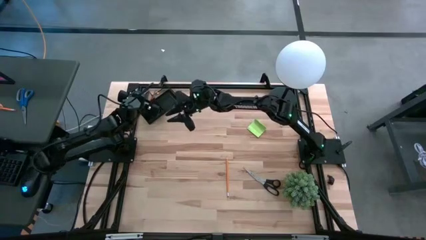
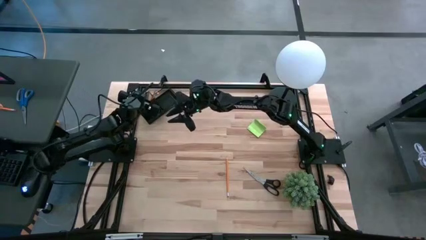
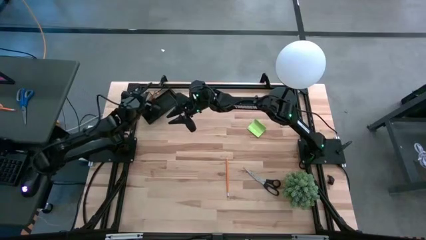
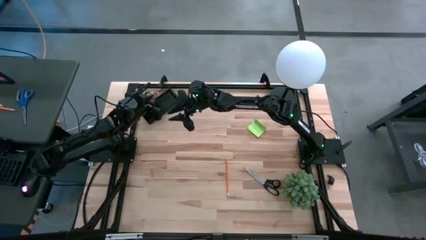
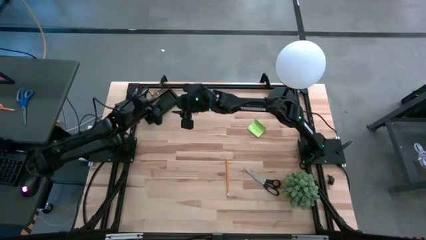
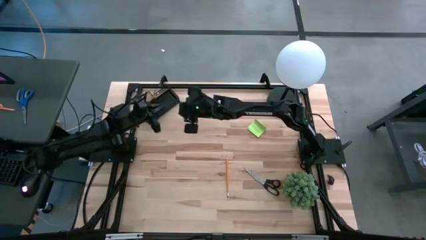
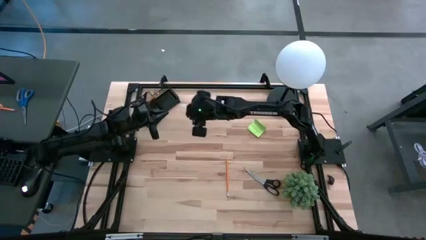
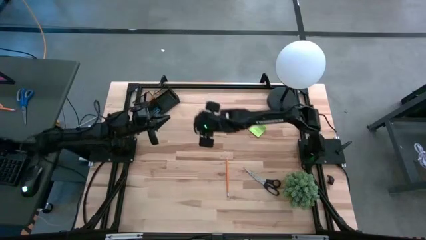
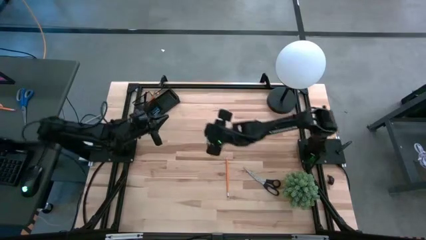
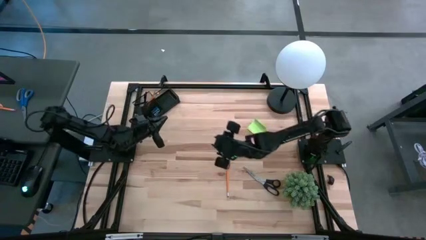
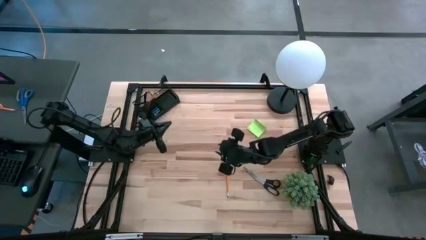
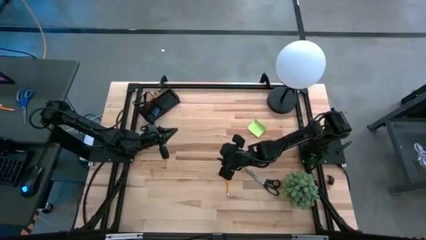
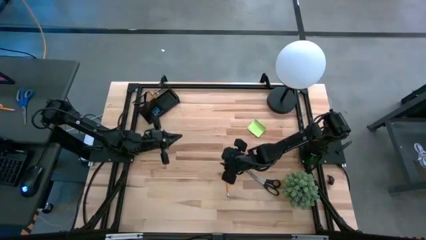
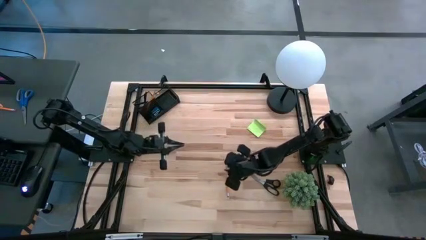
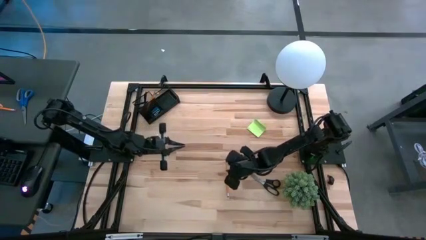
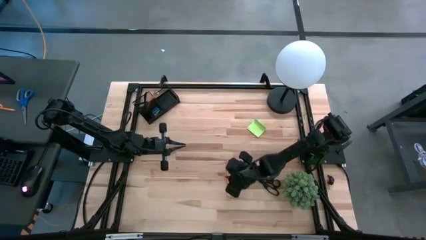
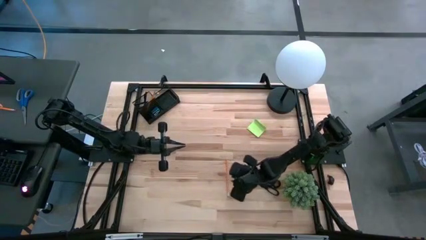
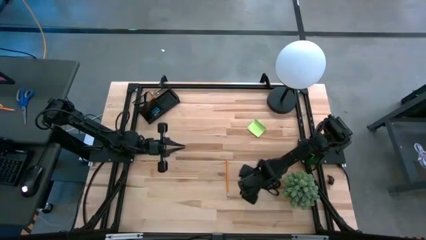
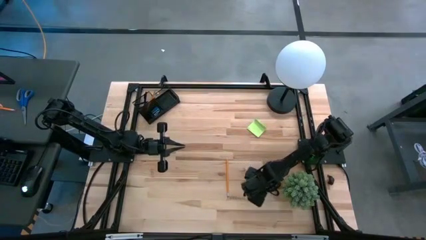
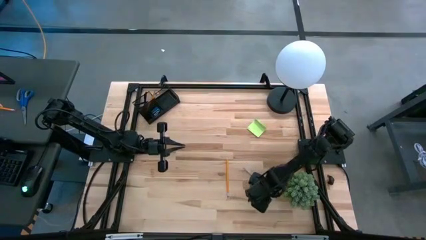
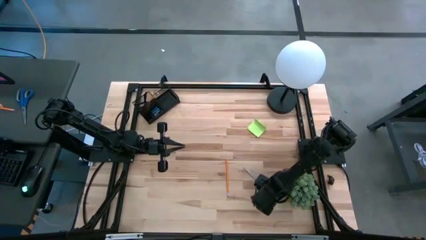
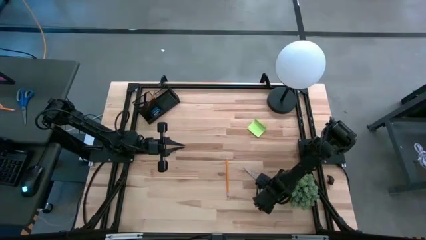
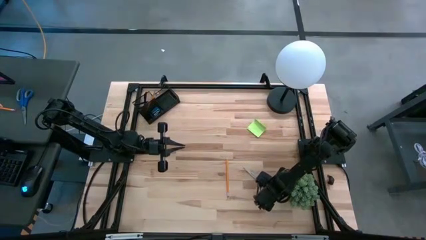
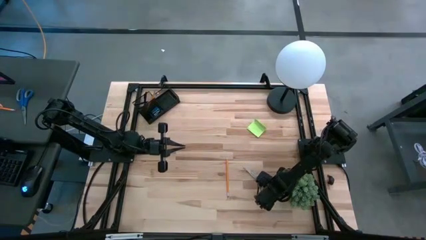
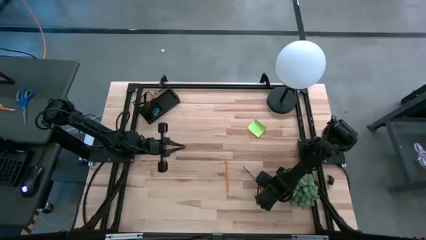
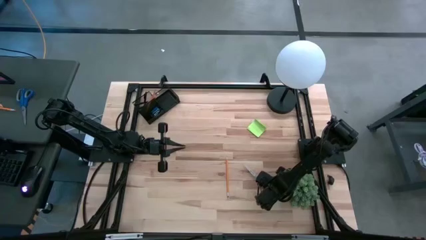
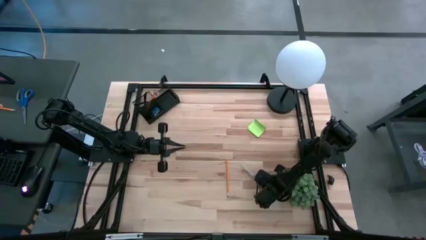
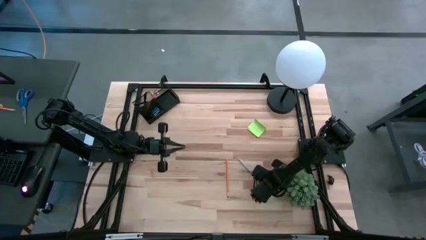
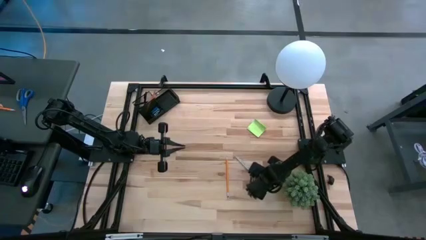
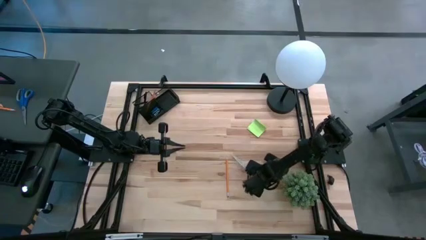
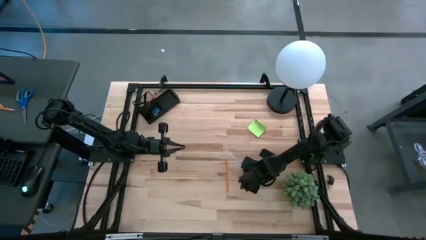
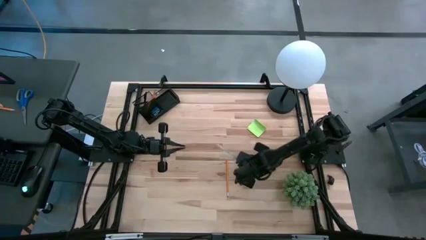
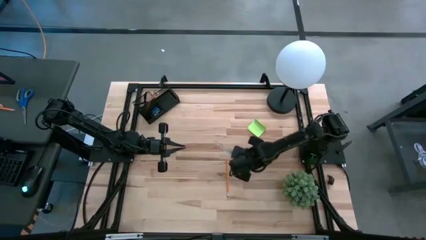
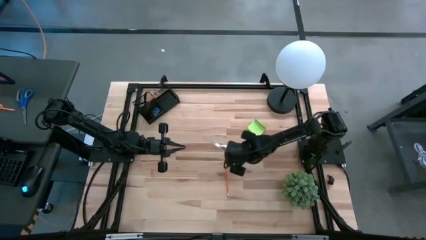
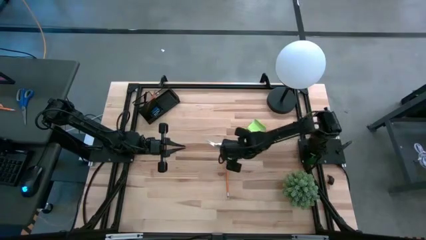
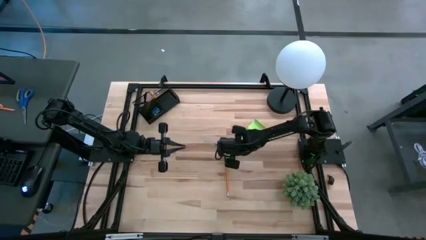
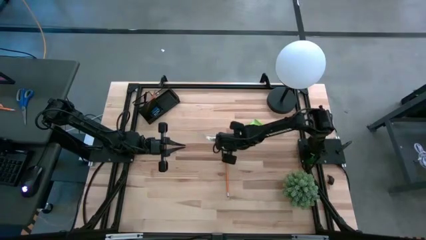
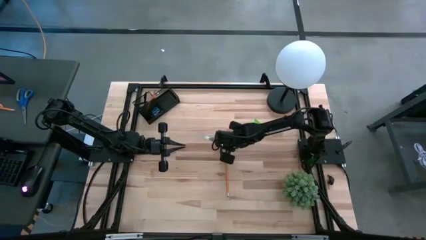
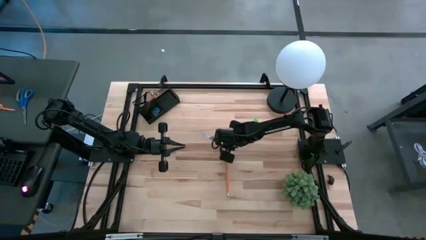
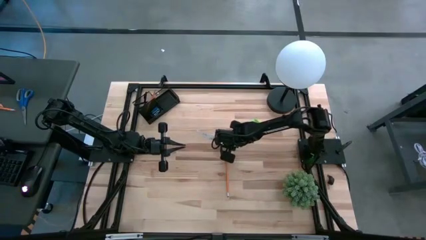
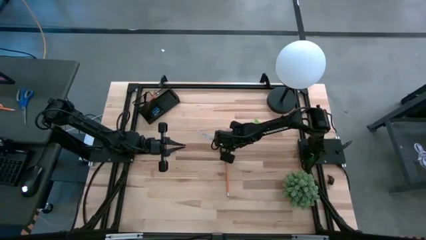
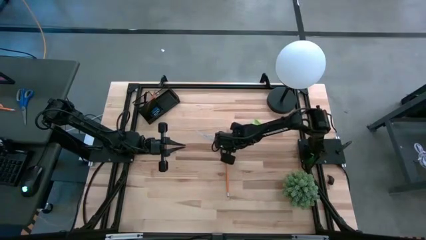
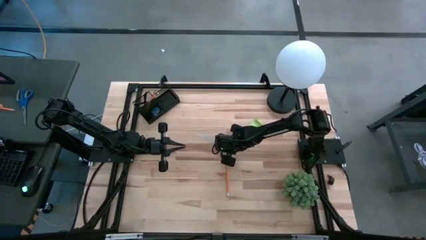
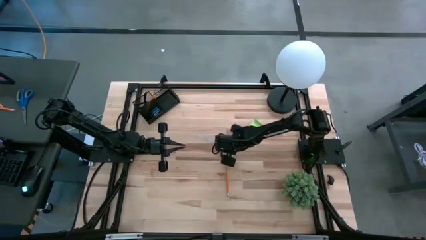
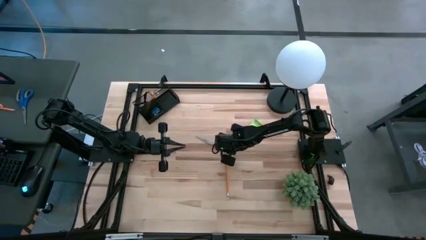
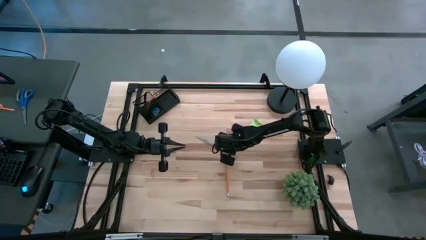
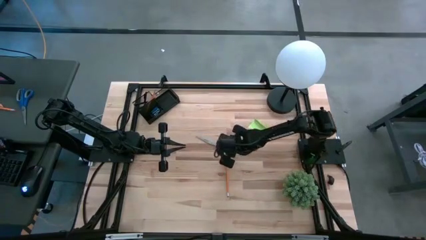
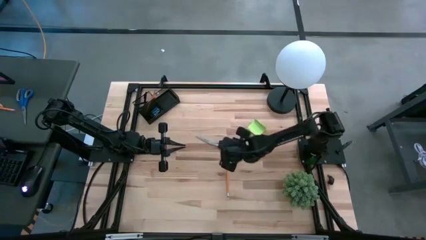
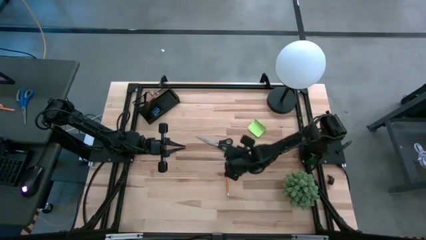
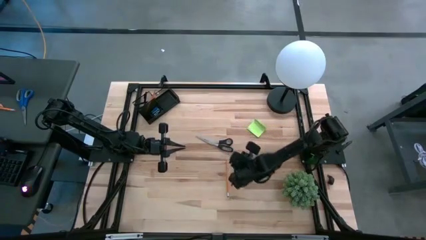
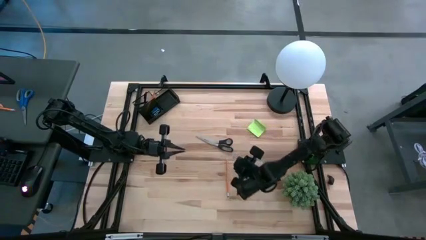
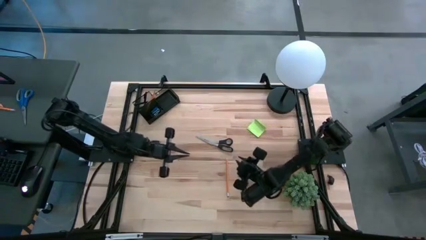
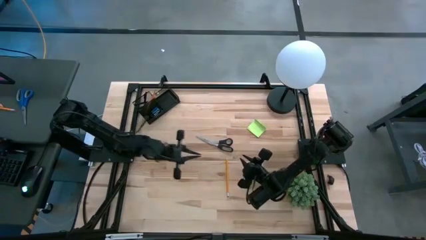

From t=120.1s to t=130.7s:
Task: Pick and place office supplies into organizer
Put the black scissors into the top left section of the desk organizer
